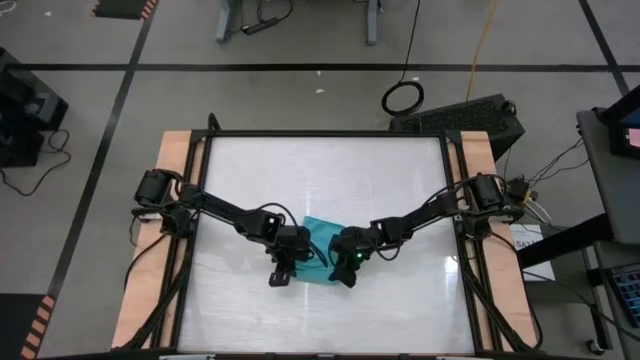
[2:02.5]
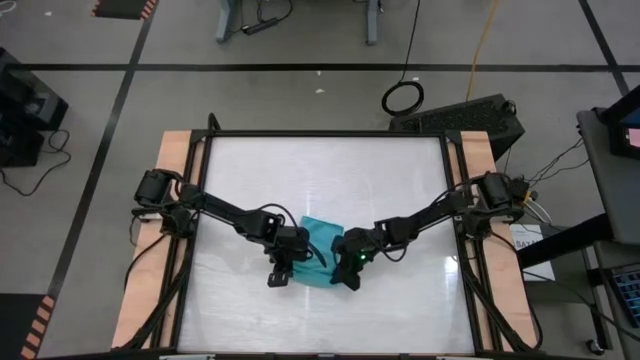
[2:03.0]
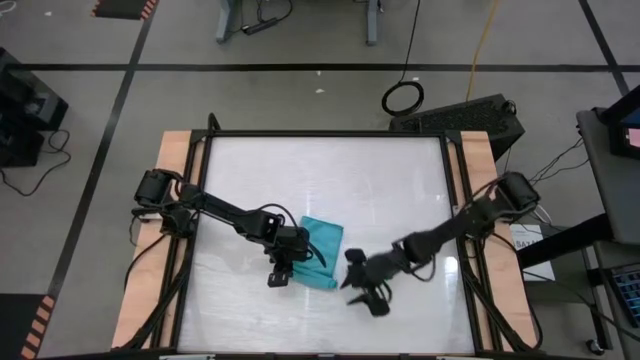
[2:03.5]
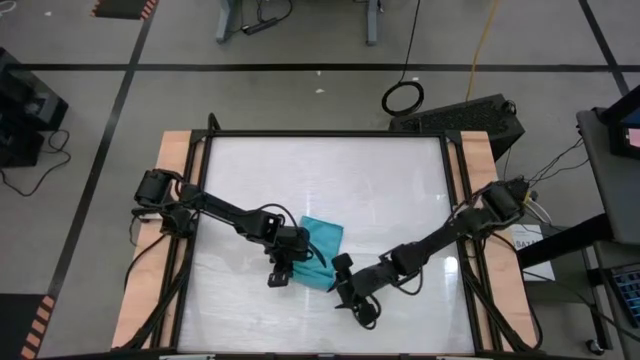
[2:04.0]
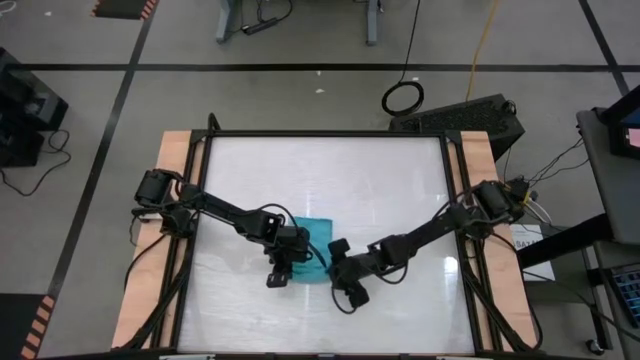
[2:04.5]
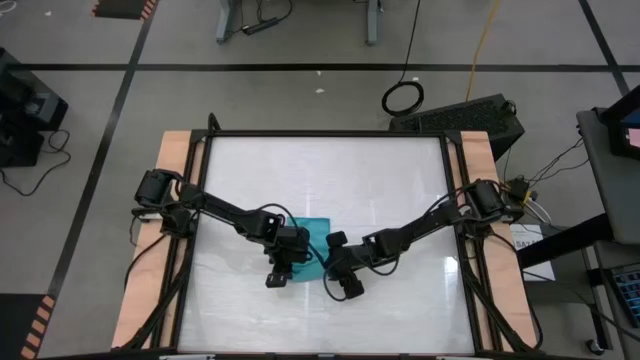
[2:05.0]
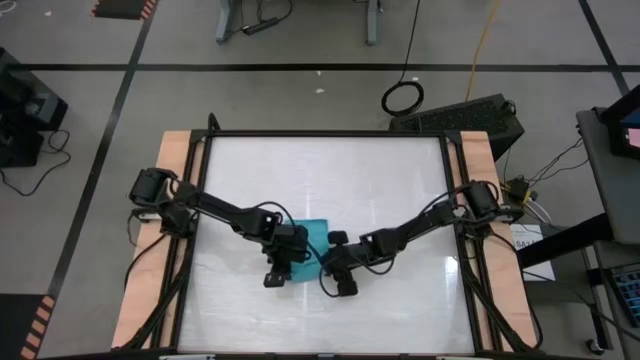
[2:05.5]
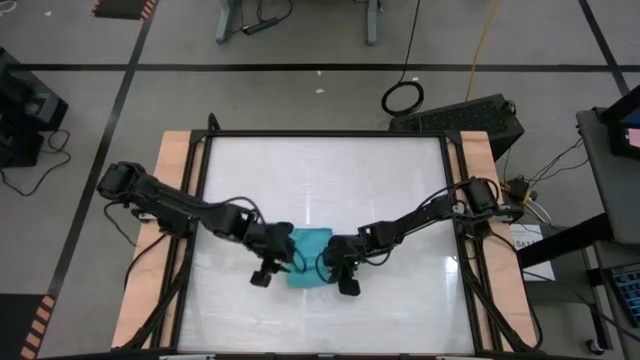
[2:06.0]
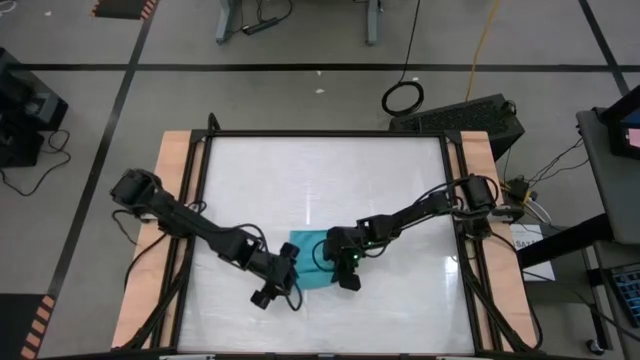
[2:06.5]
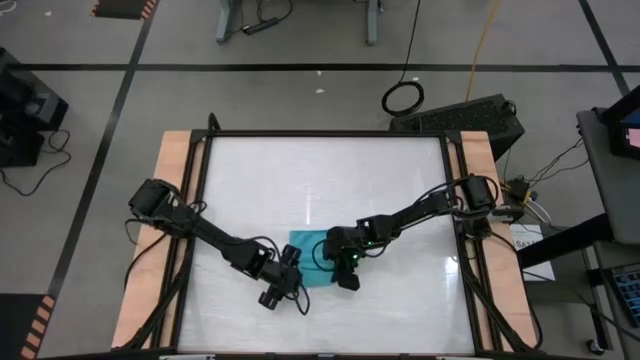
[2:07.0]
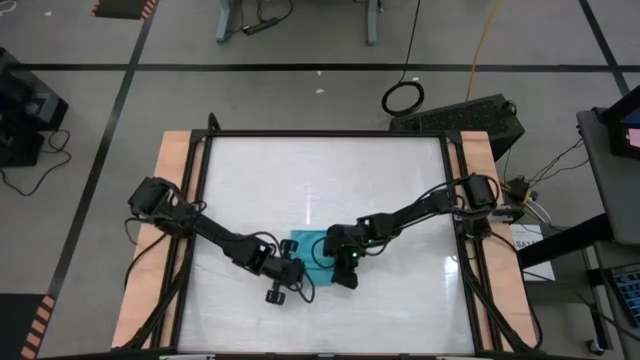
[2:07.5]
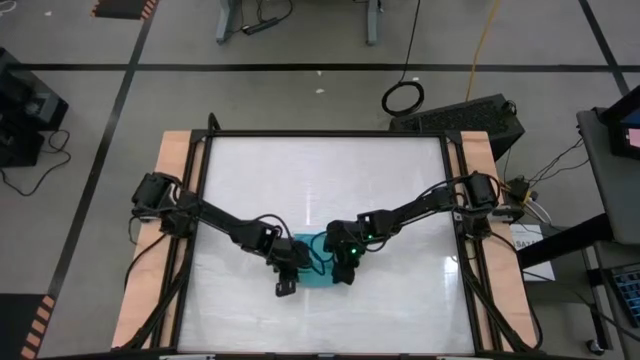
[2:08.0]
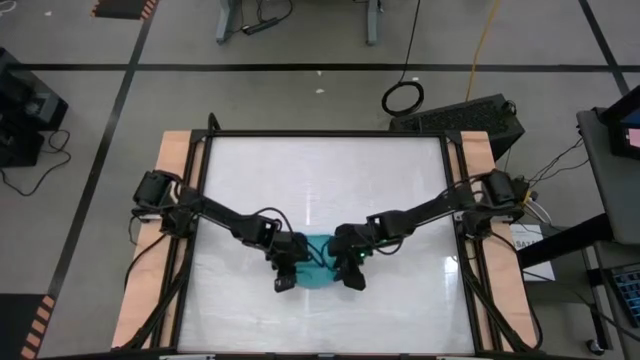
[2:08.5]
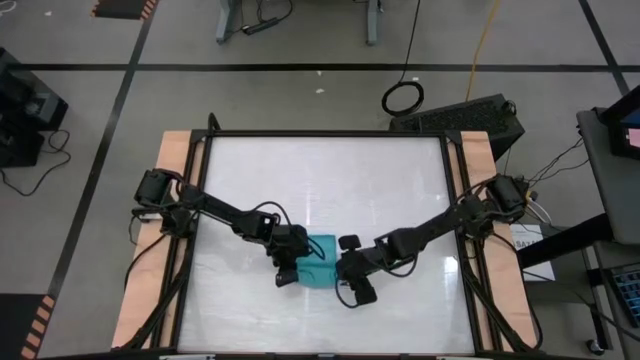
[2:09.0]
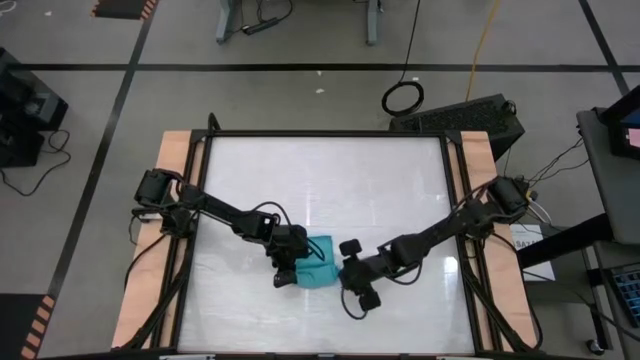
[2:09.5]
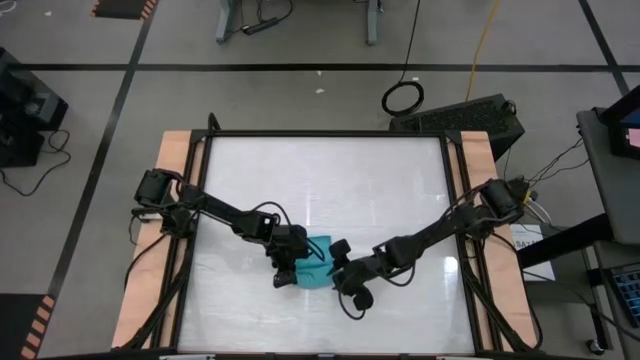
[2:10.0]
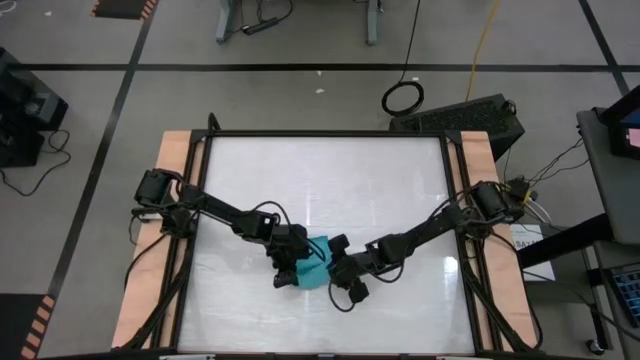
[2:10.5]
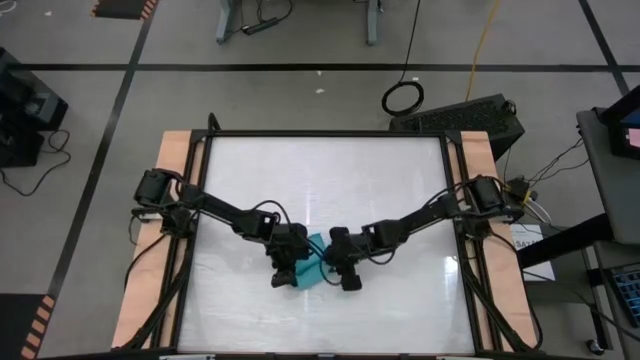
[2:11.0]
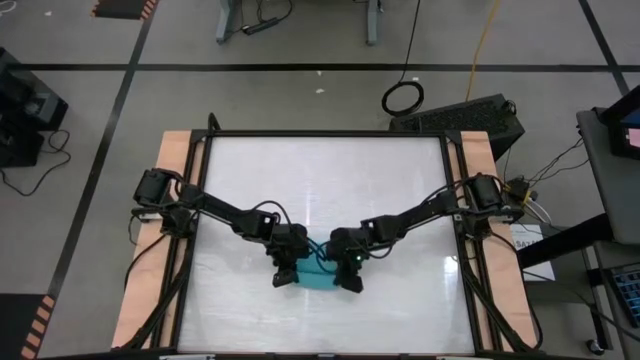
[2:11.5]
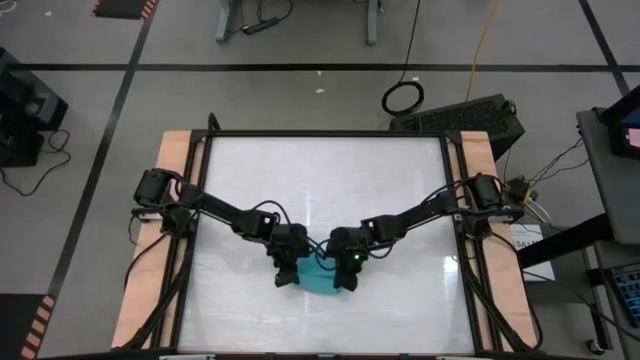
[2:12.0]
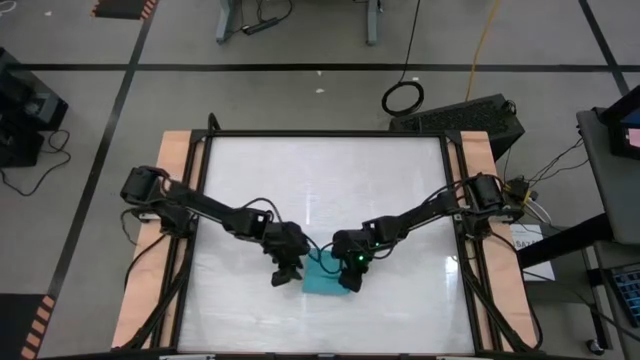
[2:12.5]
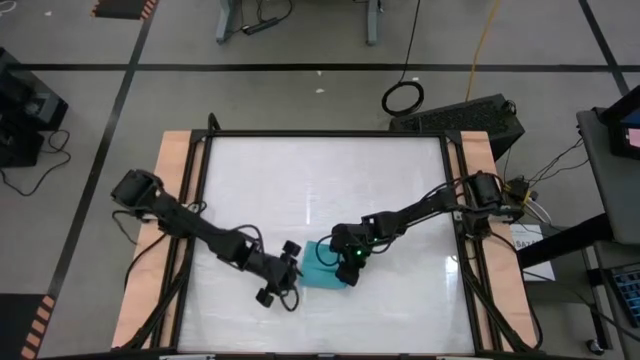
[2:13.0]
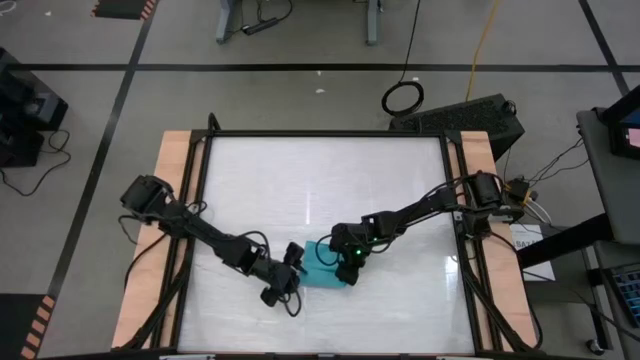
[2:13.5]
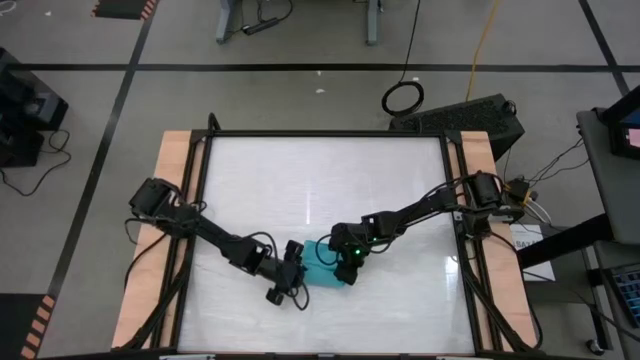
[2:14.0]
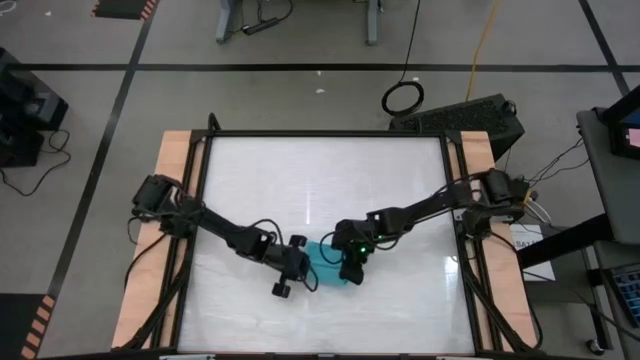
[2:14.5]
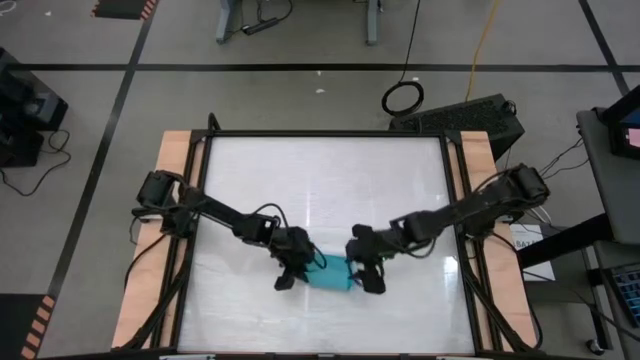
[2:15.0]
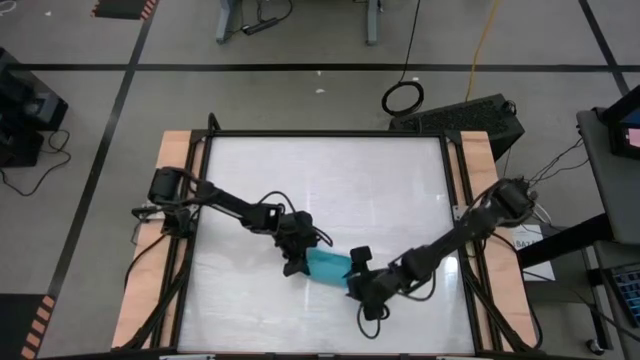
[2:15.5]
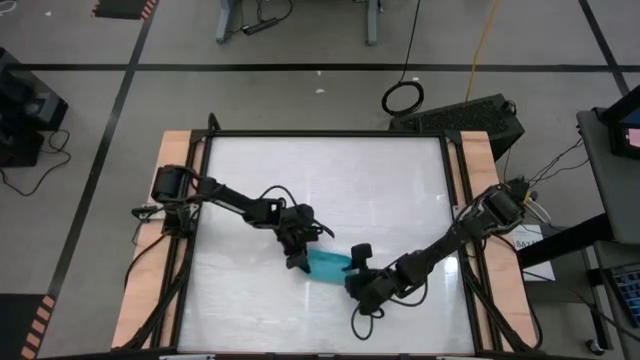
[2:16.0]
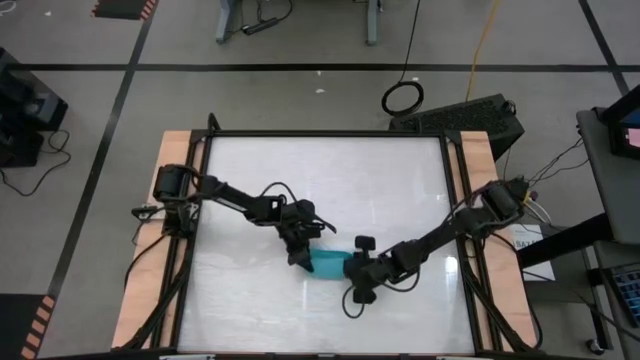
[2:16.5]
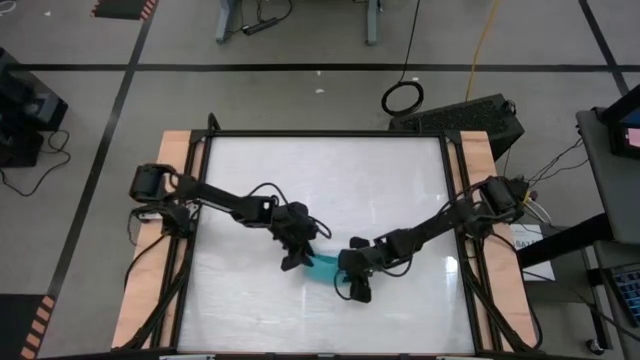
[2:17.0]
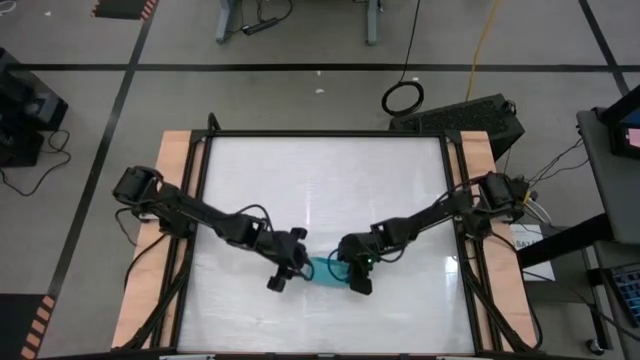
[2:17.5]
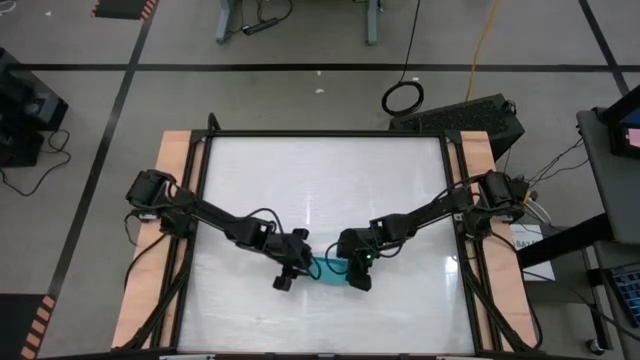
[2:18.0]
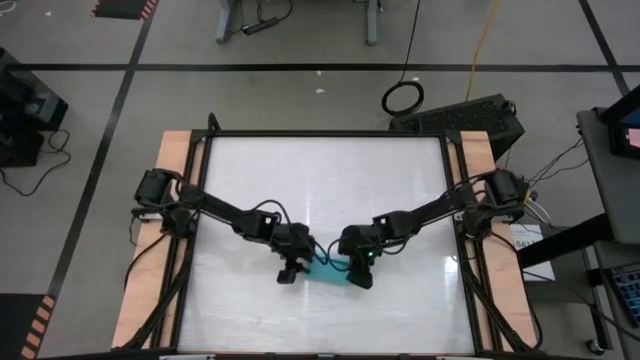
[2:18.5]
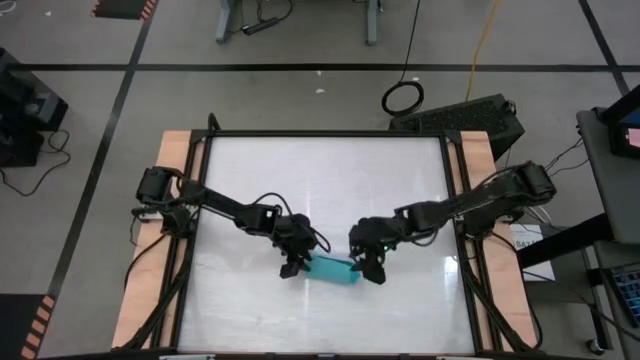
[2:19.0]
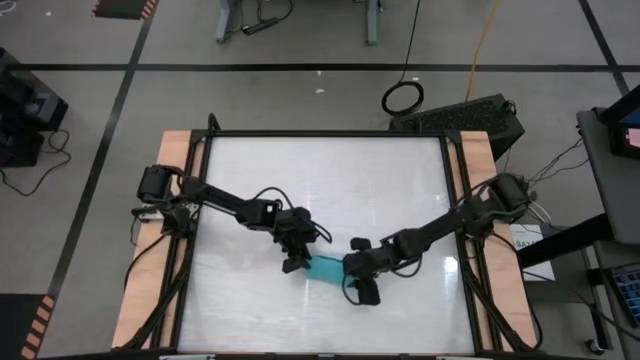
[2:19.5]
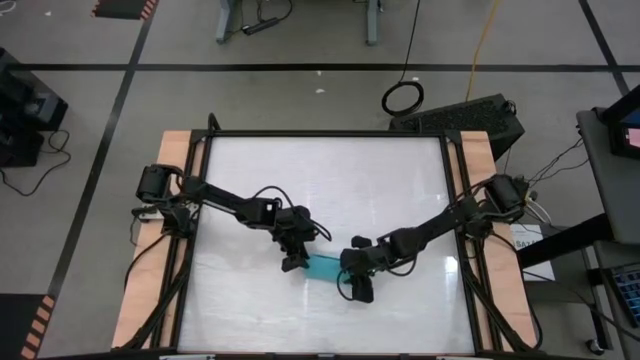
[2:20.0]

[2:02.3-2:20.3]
Task: Roll towel
Roll the blue microfiber towel

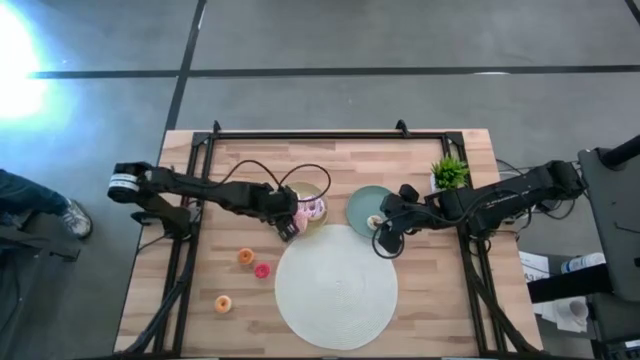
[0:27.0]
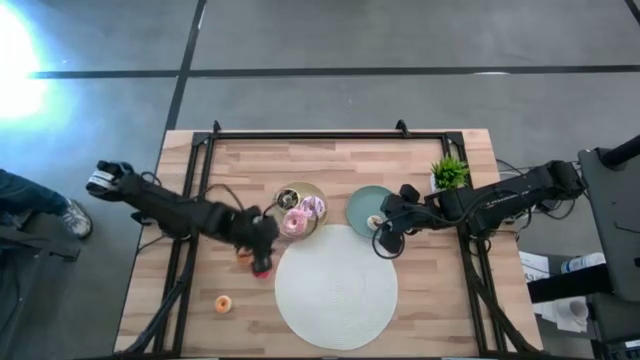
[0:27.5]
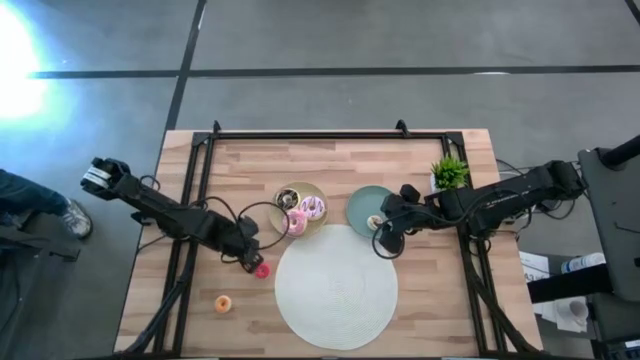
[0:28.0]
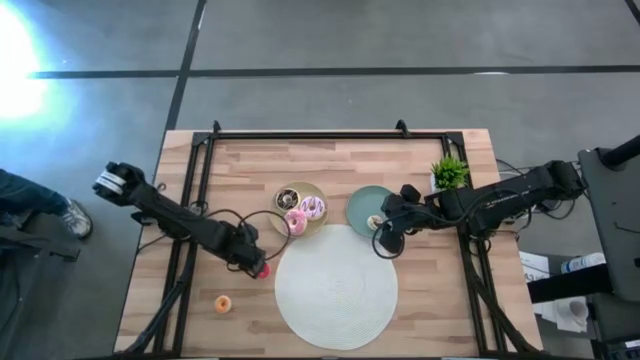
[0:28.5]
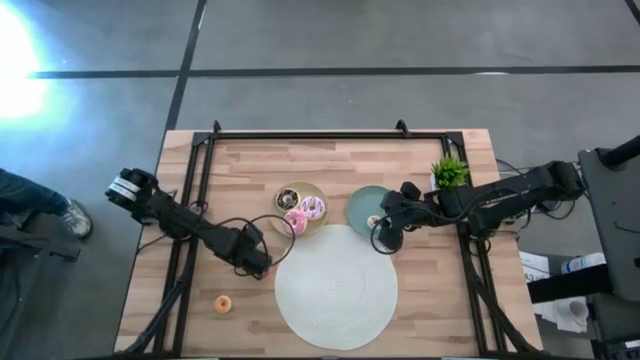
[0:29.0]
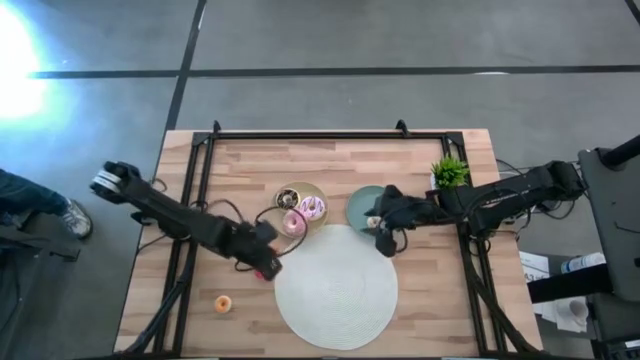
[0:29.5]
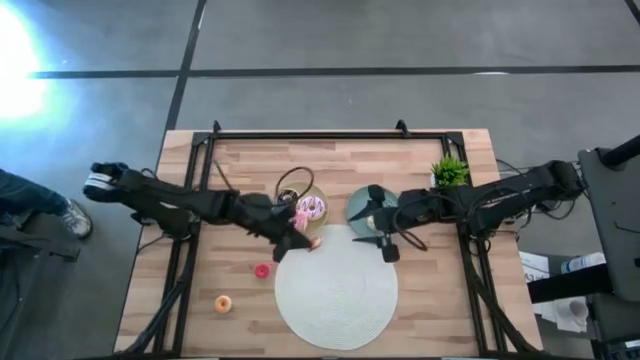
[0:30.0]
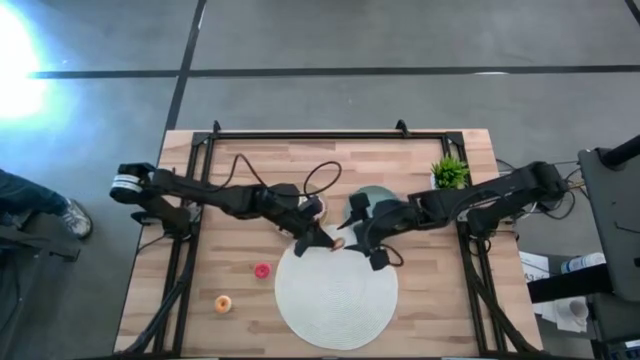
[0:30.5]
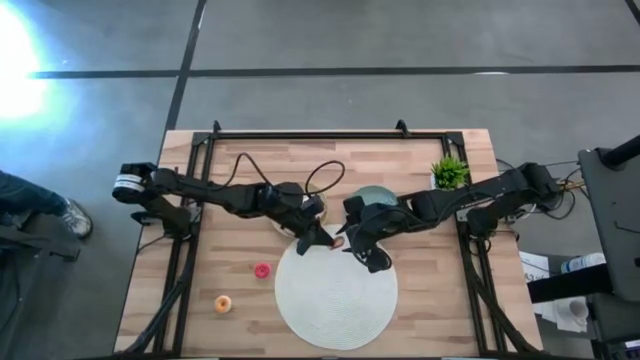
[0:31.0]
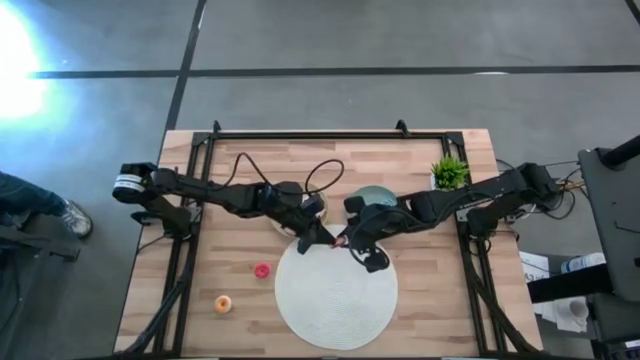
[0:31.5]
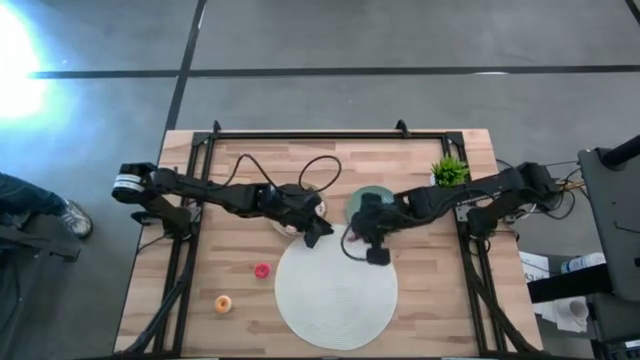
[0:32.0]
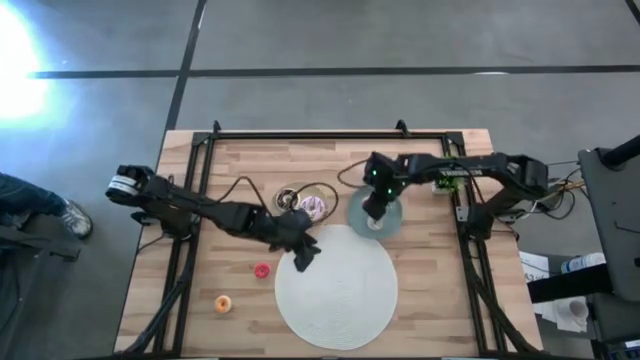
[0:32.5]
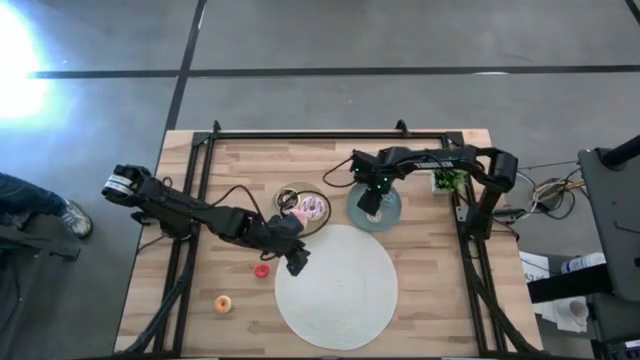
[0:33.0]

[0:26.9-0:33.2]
Task: Pick & Place donuts
Put the small orange donut on the light blue plate
